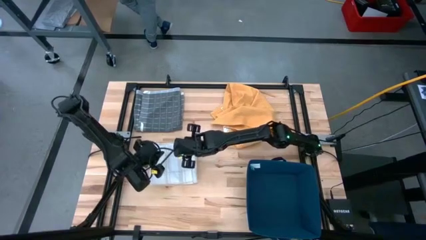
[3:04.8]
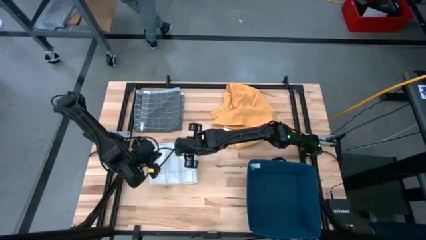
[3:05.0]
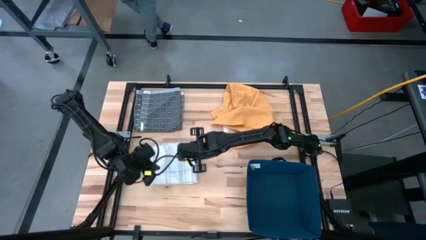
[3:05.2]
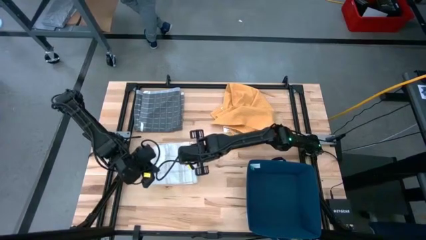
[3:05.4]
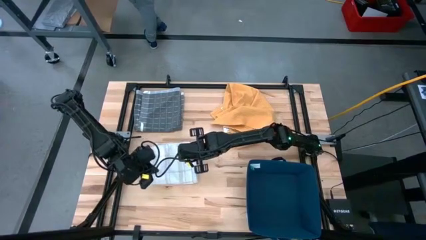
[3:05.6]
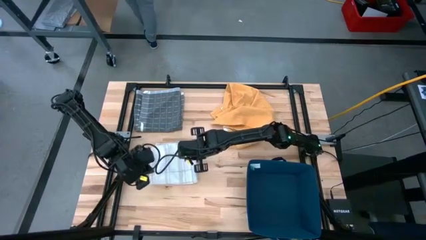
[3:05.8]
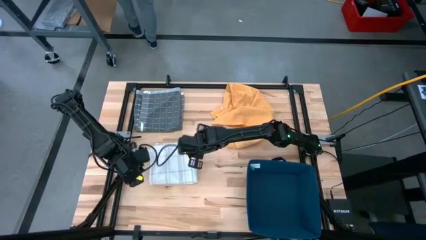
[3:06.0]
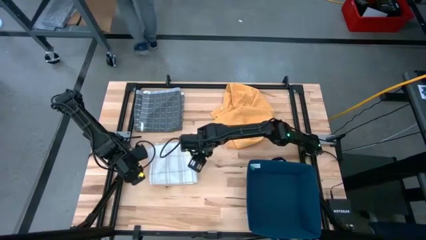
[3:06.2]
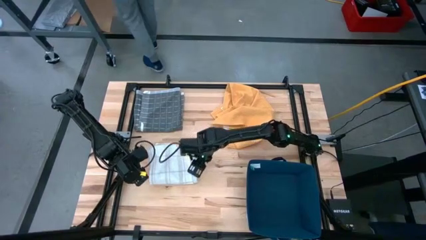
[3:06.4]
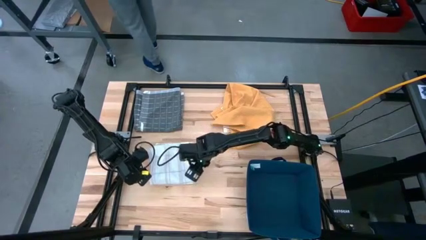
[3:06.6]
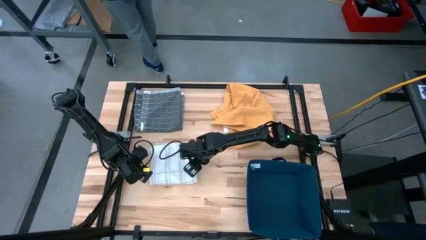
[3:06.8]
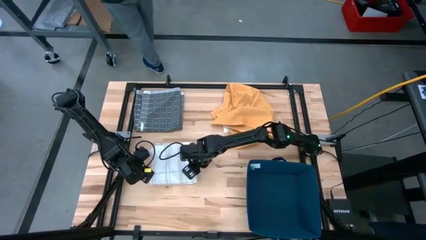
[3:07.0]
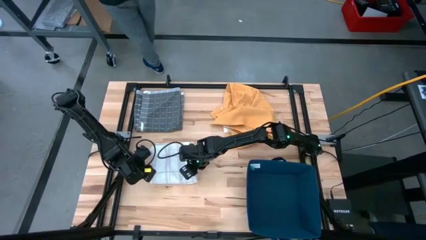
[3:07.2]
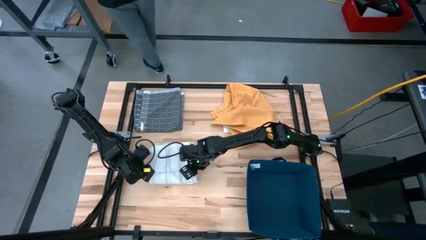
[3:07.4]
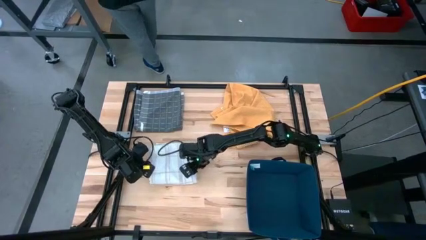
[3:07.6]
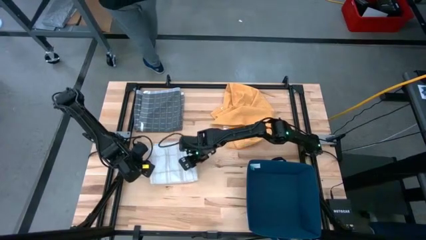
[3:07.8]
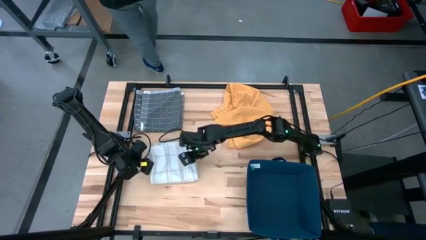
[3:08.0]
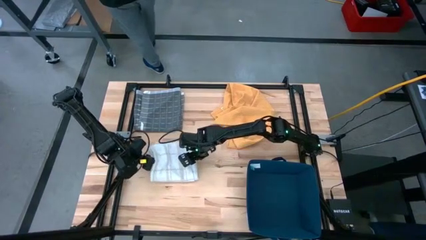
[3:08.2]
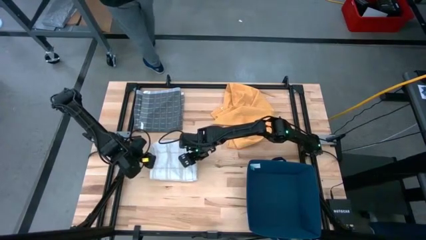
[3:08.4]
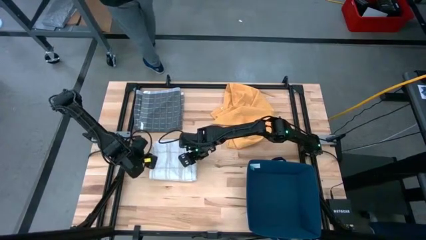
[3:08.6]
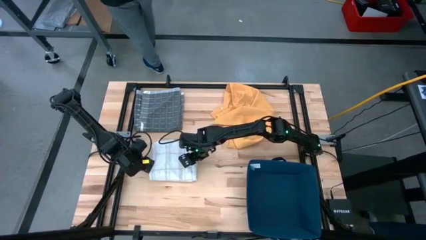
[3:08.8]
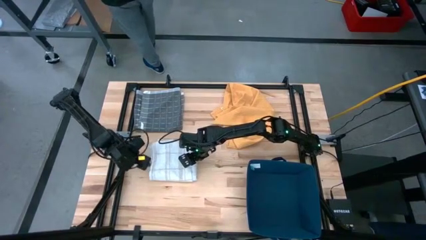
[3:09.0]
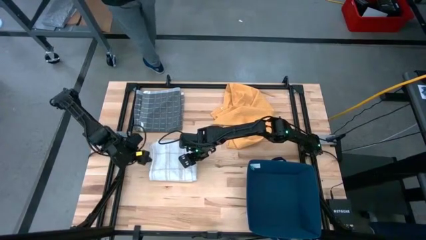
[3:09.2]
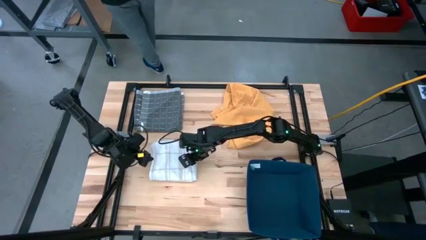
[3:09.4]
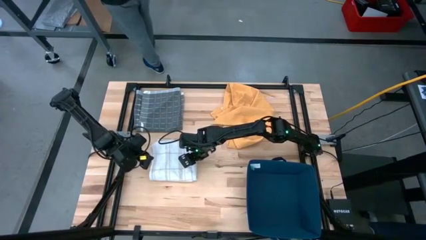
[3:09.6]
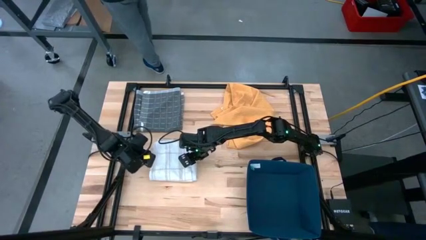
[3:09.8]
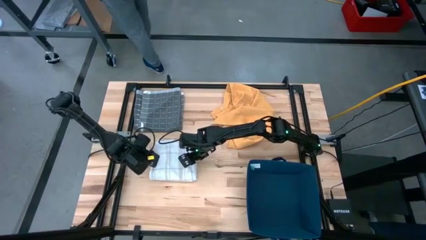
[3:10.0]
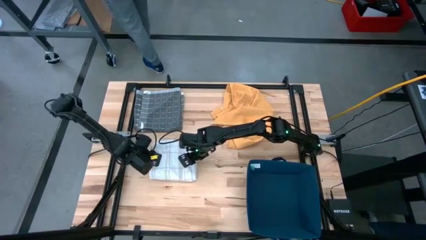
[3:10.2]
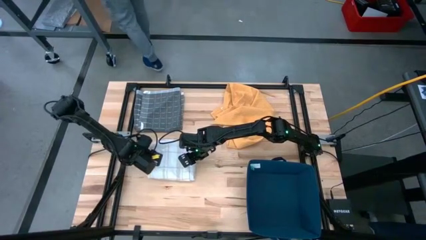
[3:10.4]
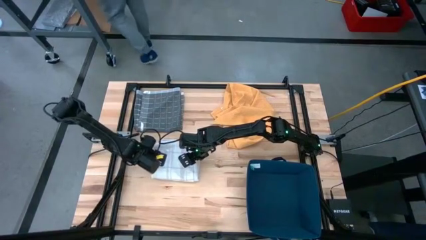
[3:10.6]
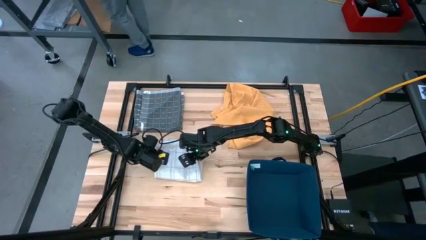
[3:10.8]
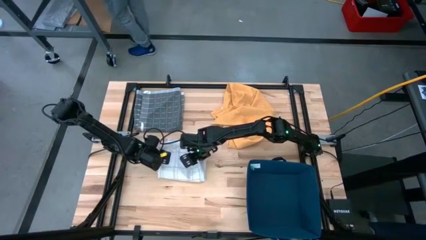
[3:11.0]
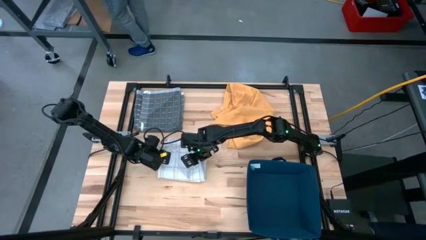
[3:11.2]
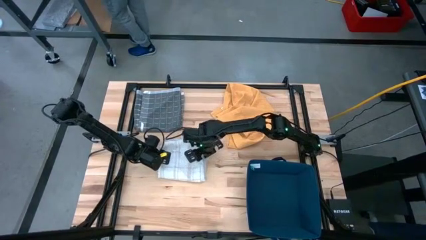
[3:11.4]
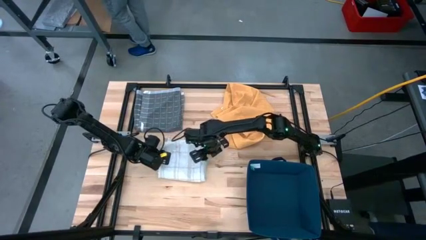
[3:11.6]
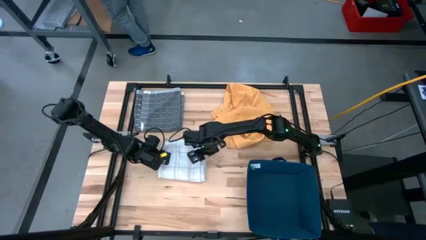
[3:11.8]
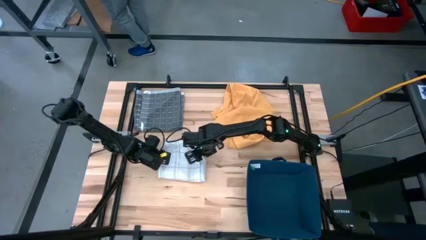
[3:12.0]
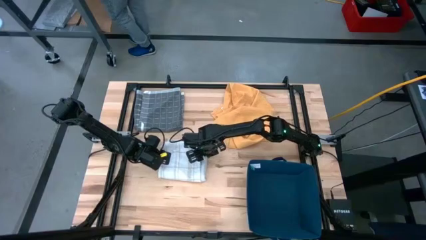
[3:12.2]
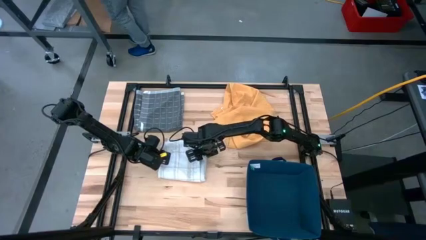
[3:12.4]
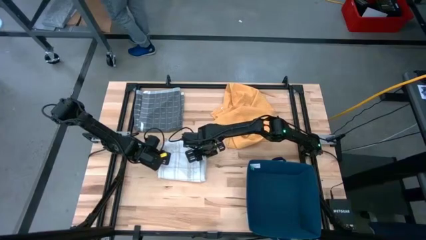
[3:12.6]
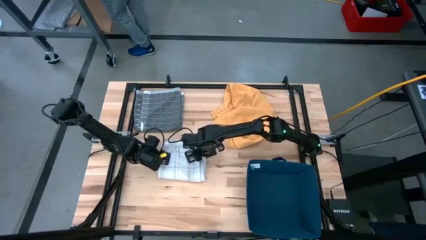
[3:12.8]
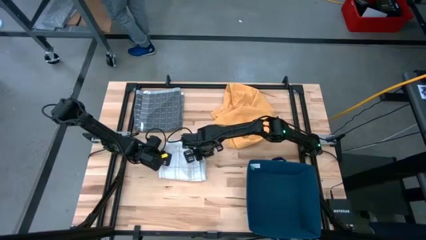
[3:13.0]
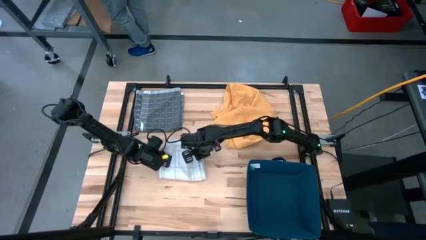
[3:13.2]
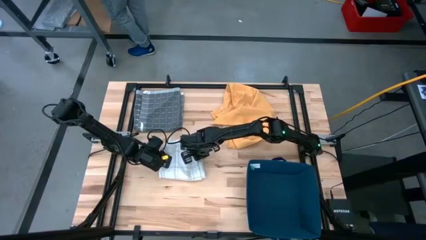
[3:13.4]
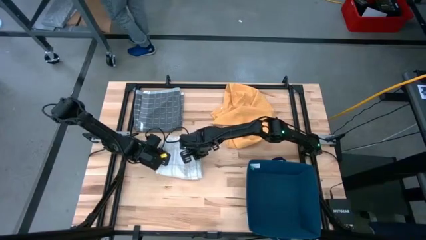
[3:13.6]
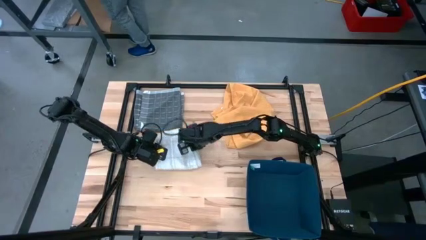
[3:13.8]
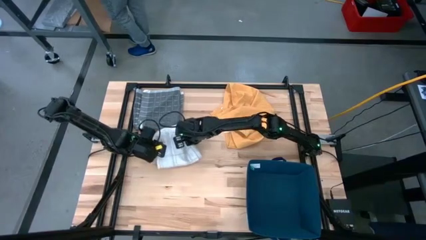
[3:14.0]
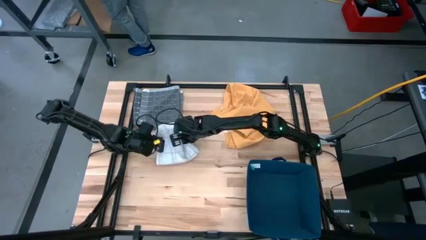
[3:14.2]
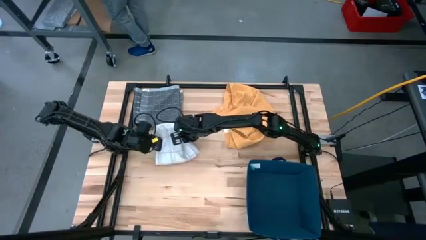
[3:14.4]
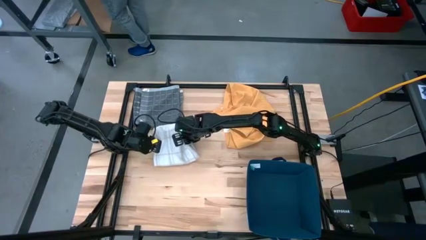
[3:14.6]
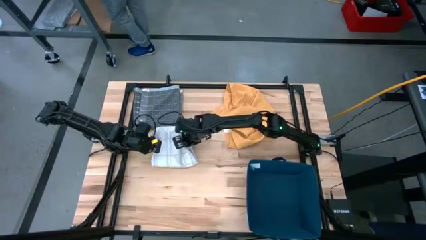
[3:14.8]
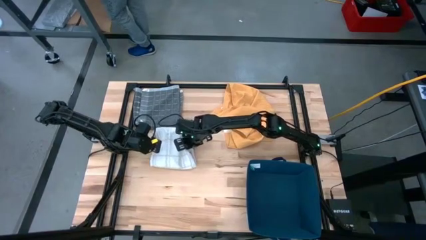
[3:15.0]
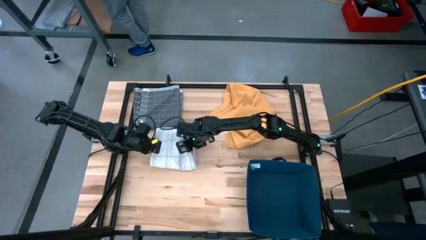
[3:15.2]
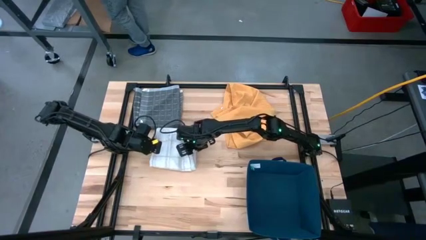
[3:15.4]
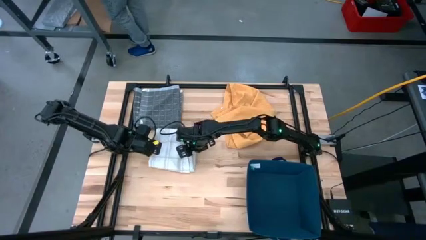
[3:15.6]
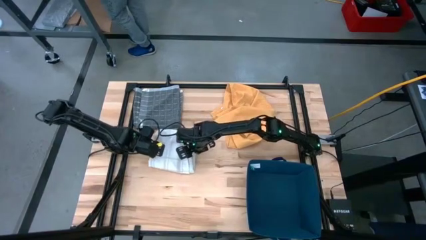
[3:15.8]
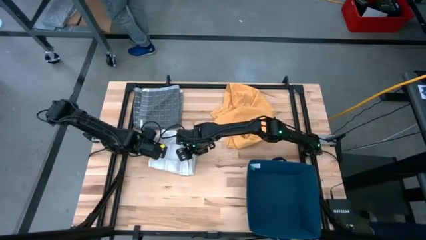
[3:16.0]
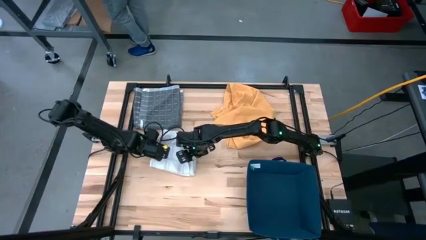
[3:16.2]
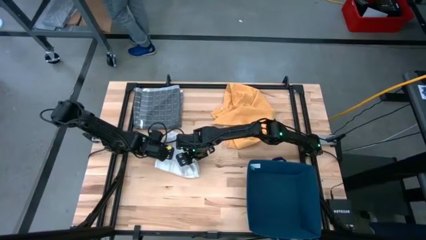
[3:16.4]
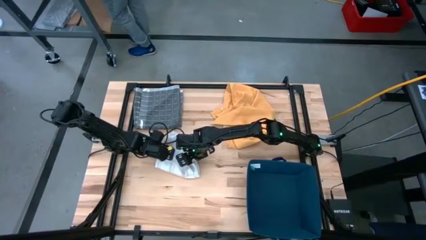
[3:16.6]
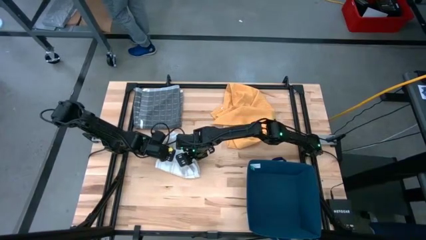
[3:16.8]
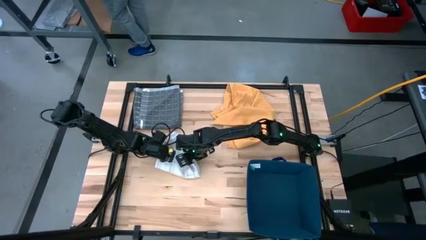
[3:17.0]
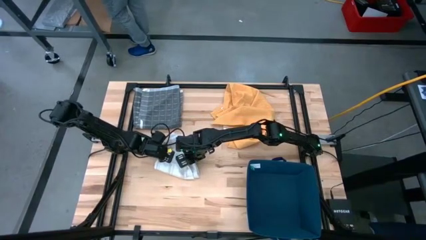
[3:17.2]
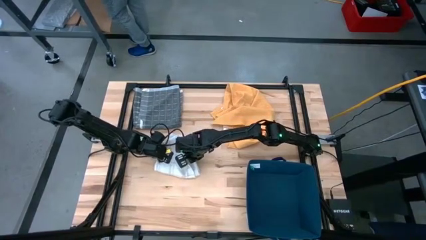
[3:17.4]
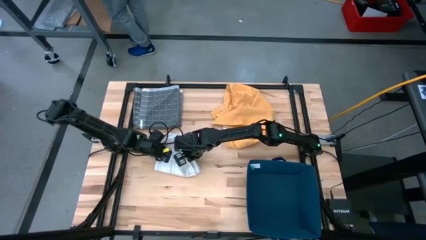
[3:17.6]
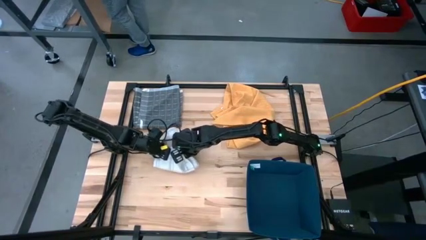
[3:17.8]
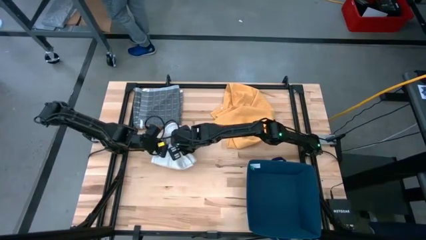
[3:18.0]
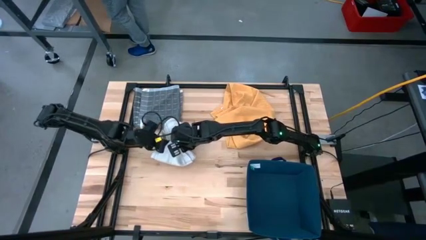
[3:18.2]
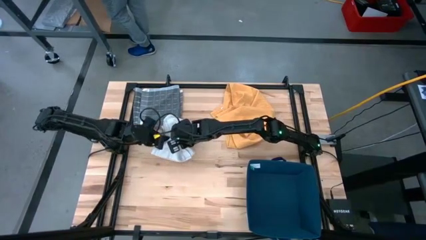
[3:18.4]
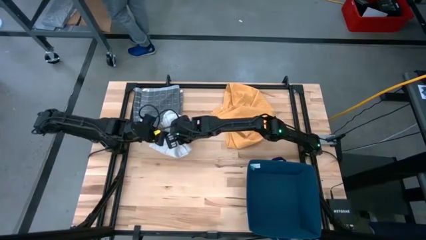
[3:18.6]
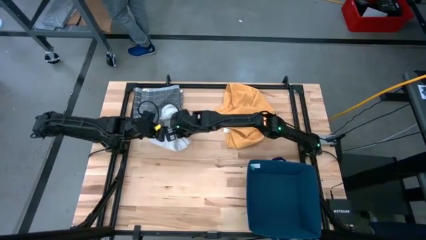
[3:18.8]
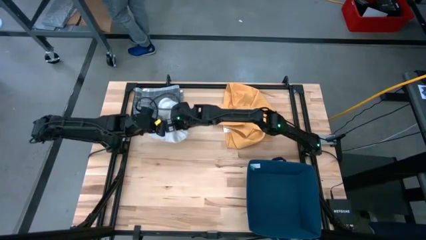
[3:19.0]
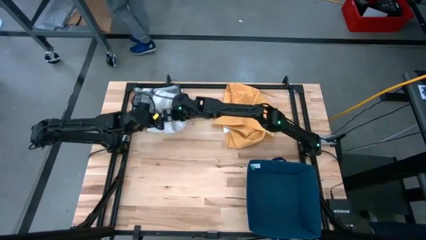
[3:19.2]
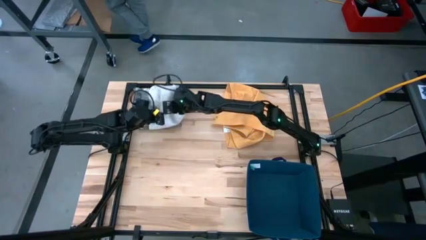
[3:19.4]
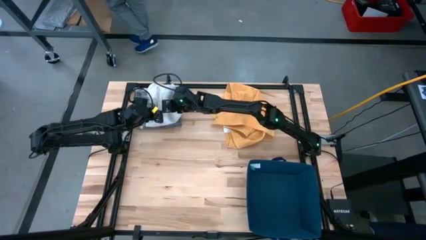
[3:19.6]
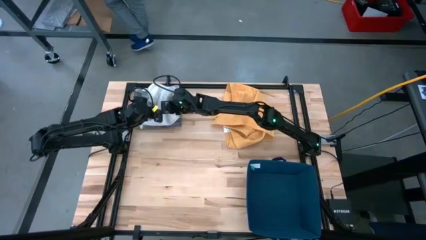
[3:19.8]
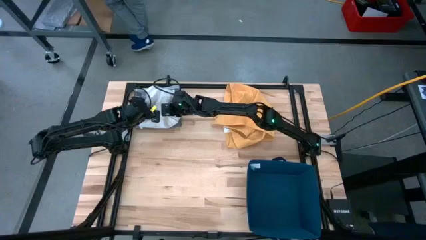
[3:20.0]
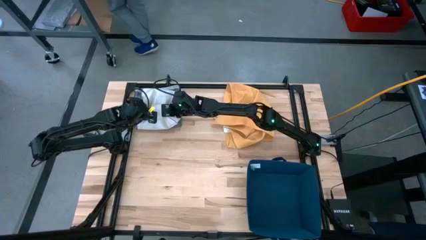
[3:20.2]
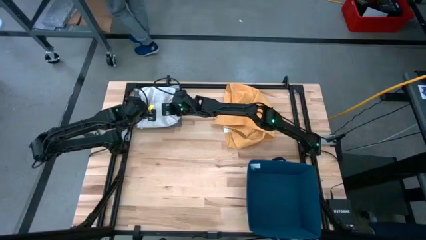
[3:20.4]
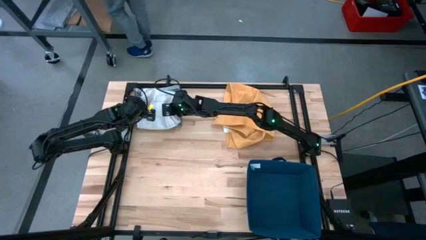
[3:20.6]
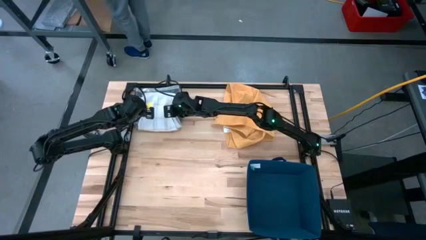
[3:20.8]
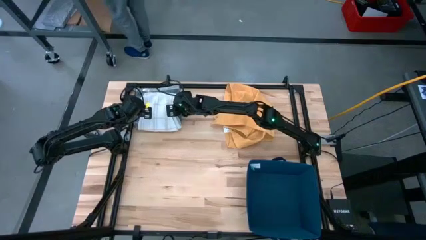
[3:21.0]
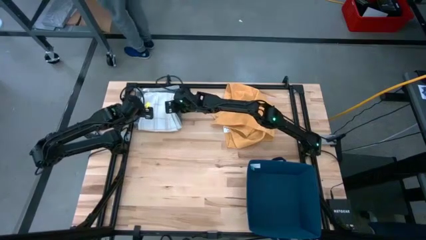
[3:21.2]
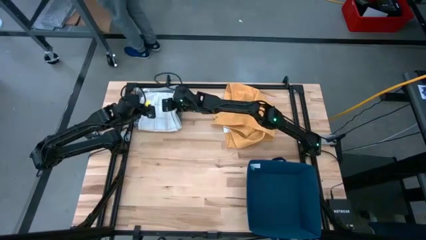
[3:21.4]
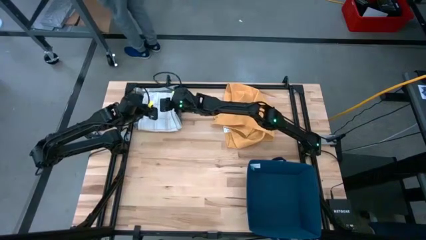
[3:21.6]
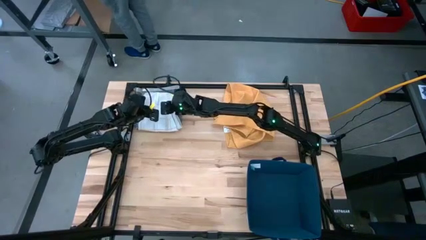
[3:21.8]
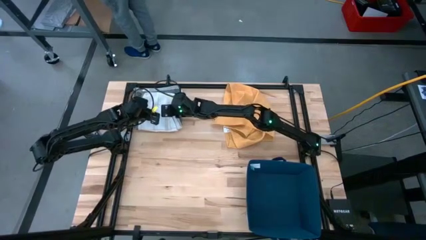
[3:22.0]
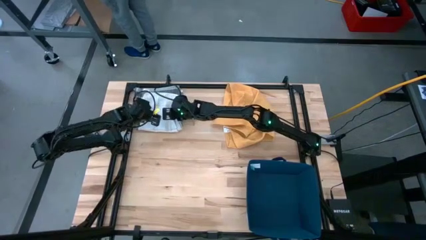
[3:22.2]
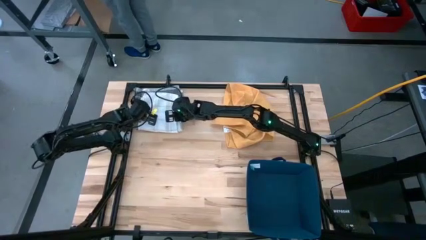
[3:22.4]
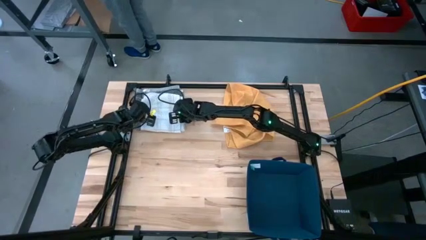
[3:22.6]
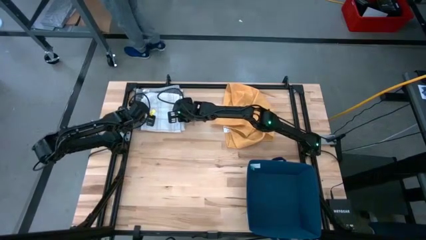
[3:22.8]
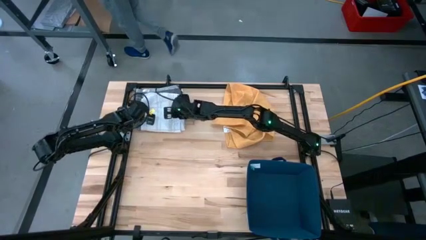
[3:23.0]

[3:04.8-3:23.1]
Task: Fold towel
Stack the white towel on top of the gray towel
